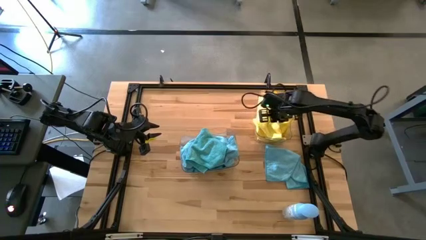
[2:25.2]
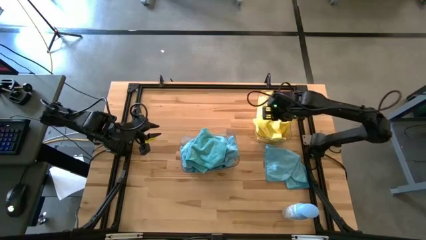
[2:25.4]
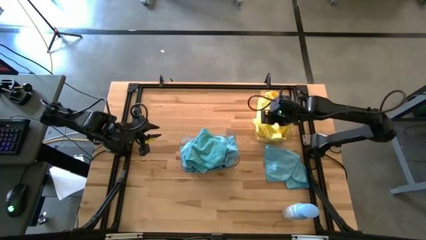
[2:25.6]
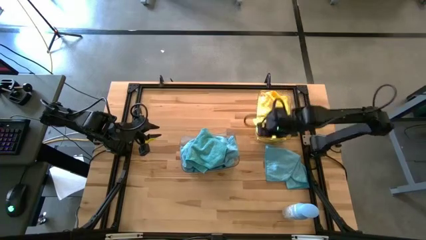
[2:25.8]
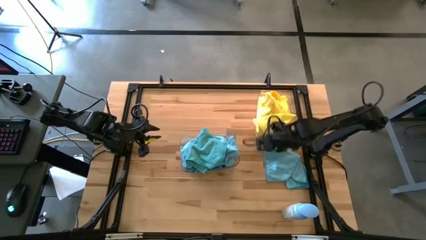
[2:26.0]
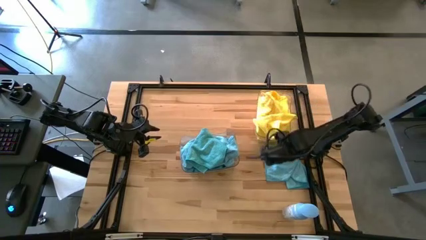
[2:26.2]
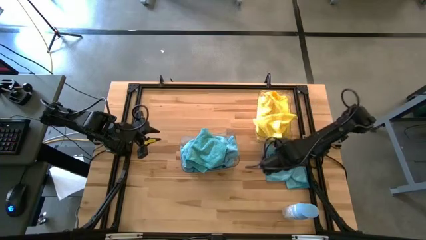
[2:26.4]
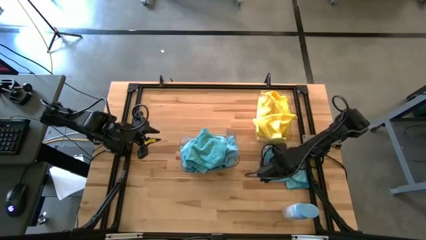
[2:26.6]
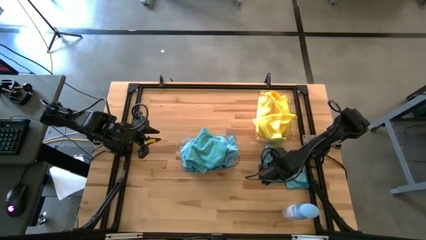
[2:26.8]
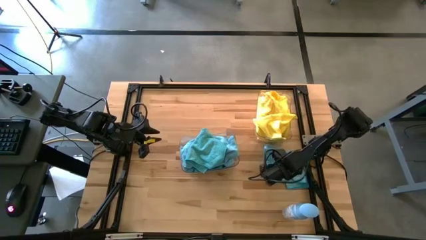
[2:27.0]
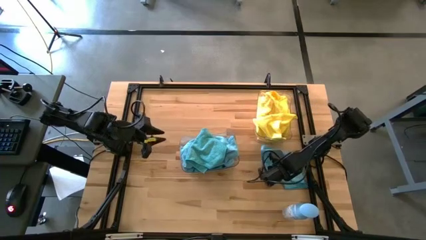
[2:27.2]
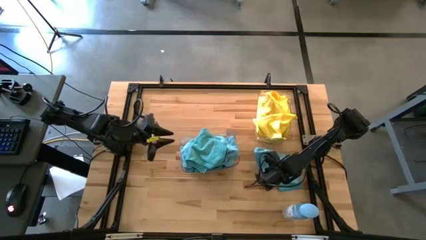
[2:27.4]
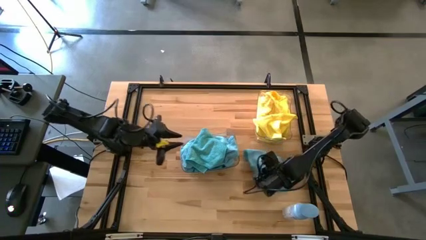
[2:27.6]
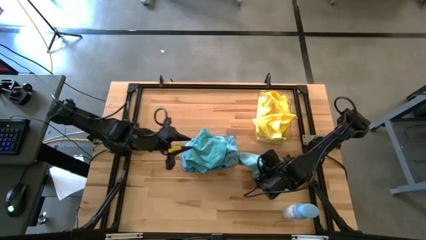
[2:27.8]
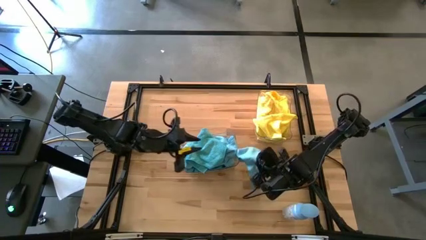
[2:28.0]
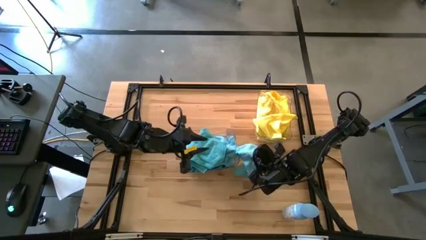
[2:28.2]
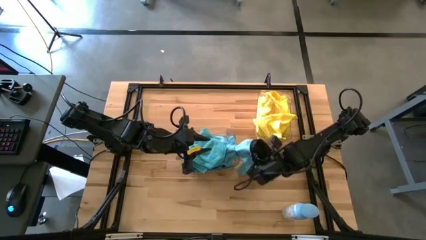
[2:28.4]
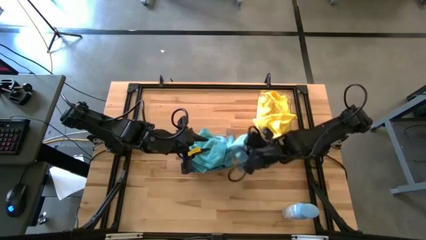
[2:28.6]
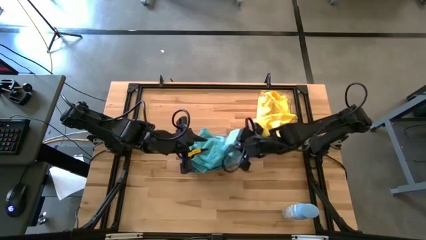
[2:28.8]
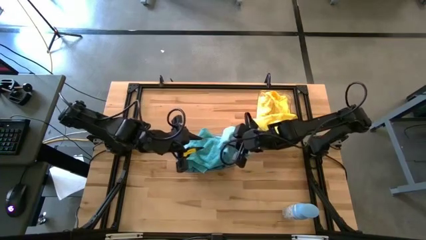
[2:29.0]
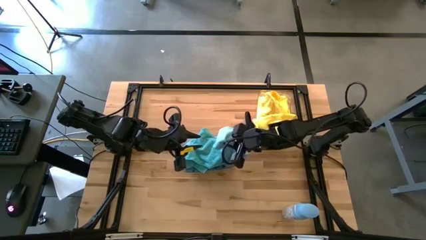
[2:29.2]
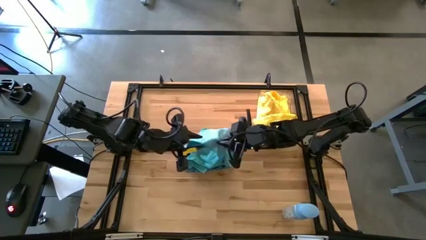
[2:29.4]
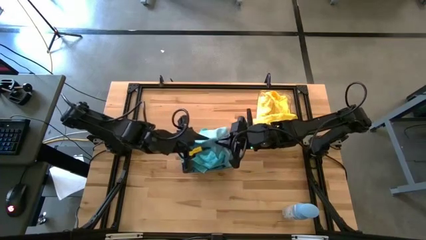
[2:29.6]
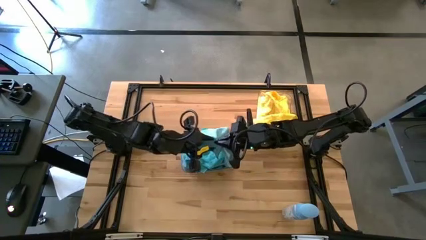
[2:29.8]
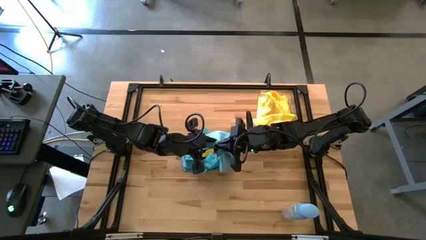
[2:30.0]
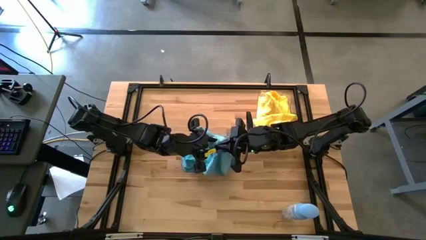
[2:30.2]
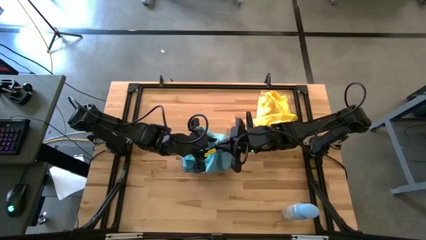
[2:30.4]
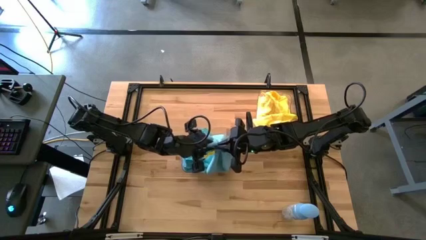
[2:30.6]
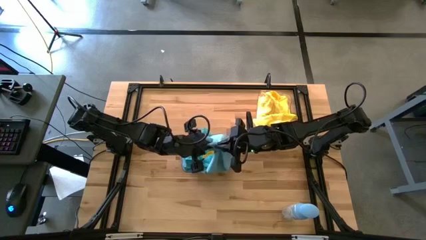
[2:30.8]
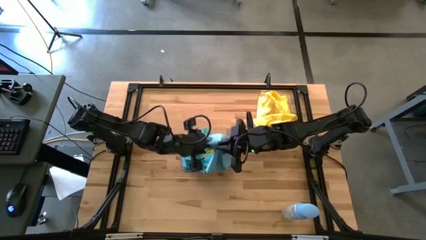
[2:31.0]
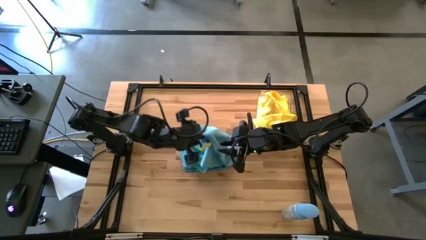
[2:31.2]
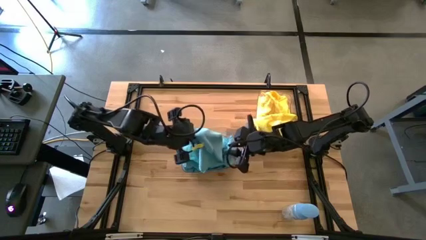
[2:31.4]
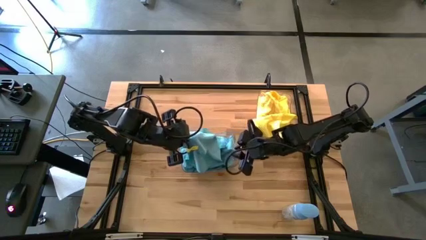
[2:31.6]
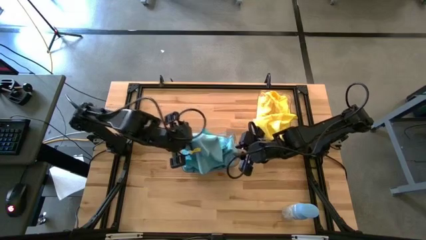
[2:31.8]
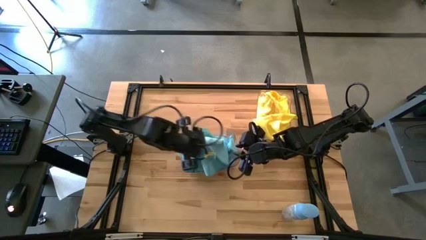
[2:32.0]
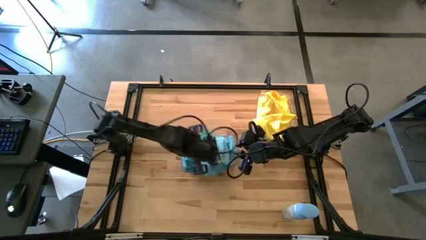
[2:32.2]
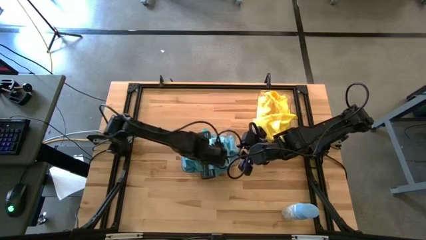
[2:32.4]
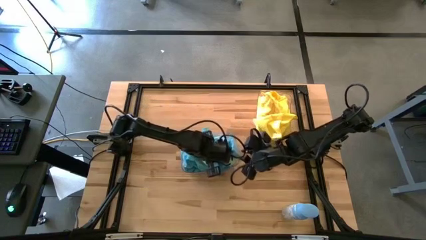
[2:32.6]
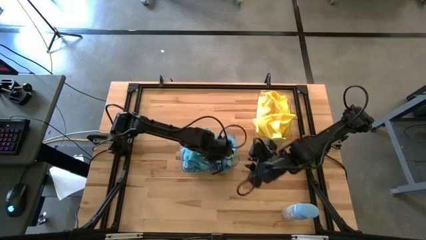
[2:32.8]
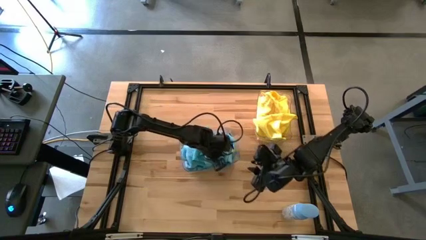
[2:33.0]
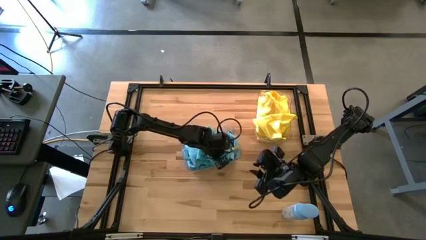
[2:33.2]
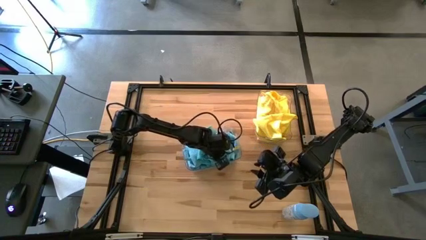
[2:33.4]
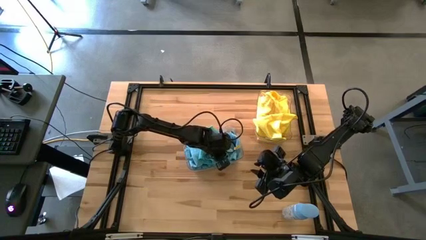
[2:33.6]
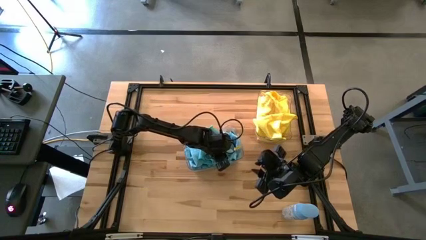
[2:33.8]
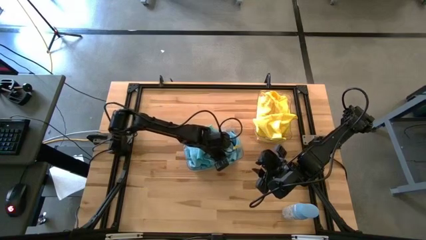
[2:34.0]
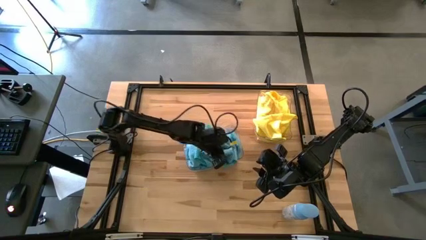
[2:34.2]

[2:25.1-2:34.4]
Task: Sort microfiber towel by color & place in baskets
Put the blue towel into the bottom transparent bin

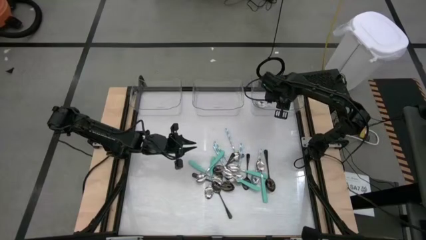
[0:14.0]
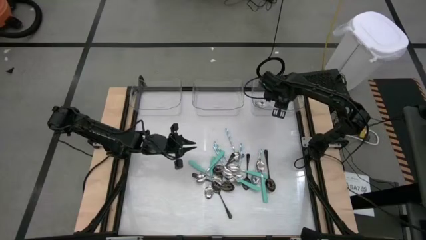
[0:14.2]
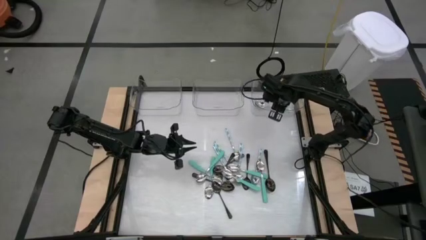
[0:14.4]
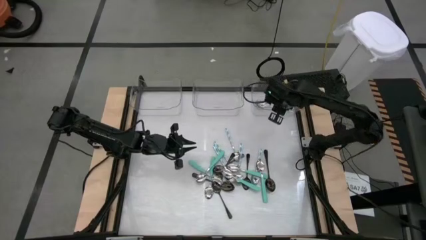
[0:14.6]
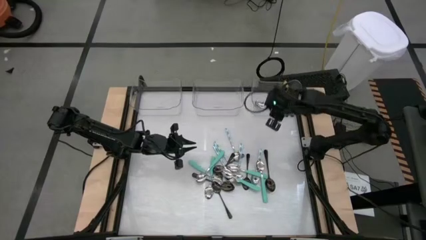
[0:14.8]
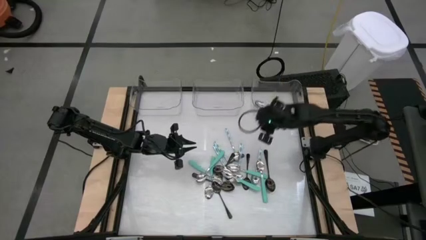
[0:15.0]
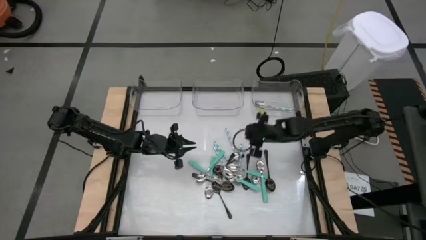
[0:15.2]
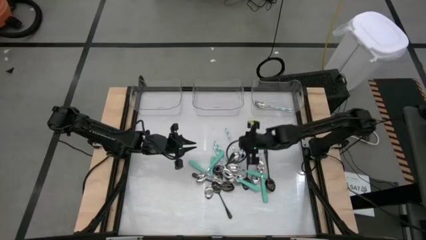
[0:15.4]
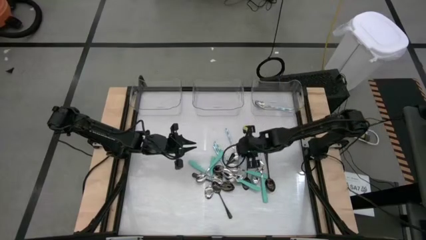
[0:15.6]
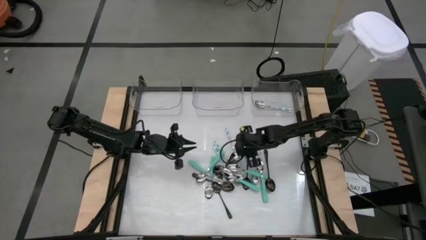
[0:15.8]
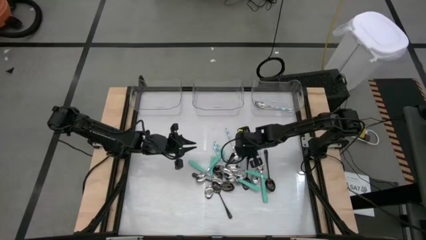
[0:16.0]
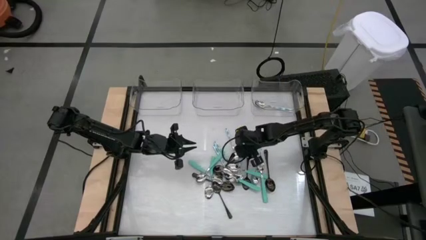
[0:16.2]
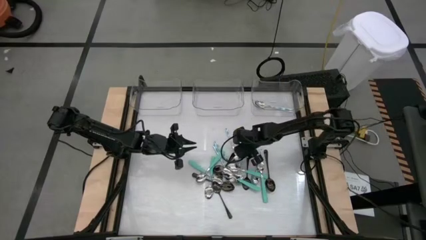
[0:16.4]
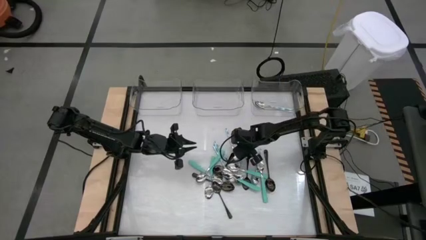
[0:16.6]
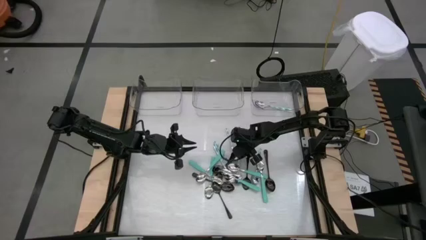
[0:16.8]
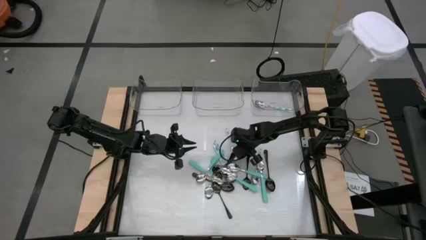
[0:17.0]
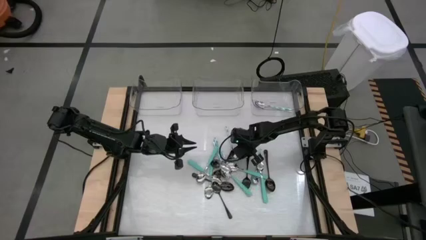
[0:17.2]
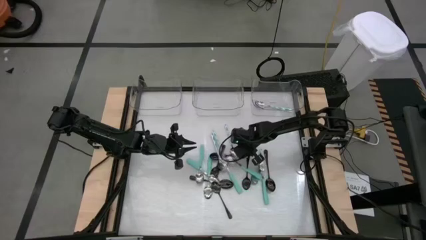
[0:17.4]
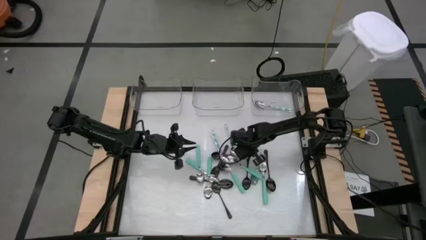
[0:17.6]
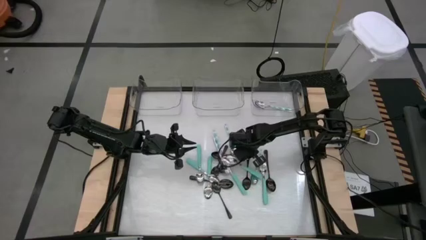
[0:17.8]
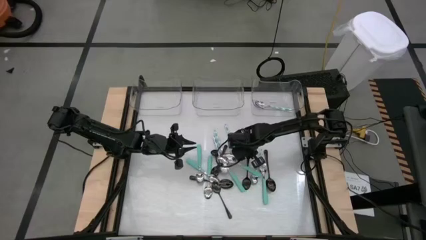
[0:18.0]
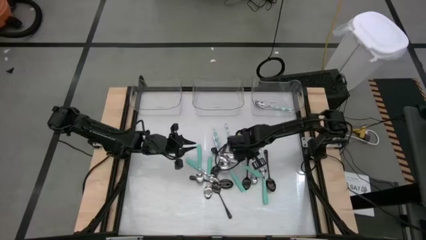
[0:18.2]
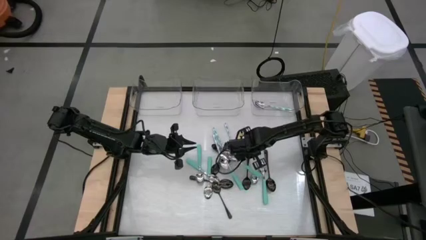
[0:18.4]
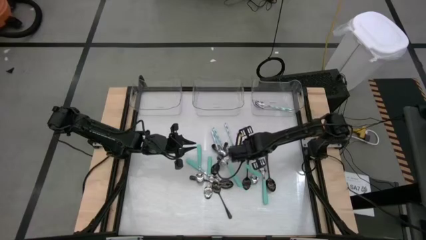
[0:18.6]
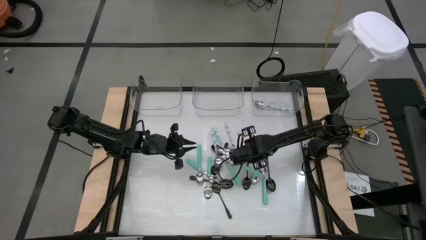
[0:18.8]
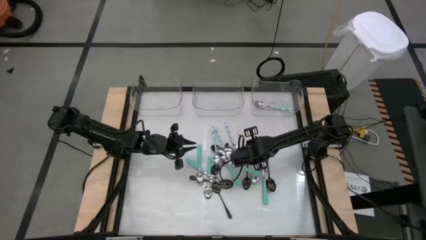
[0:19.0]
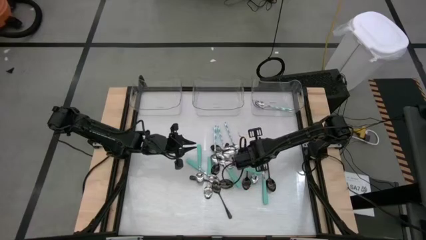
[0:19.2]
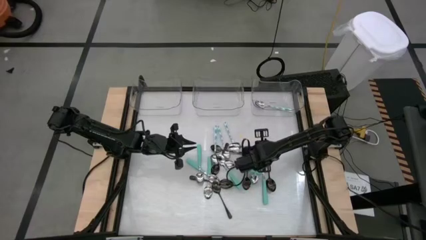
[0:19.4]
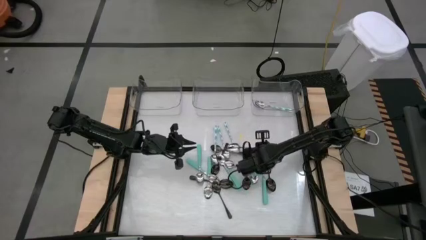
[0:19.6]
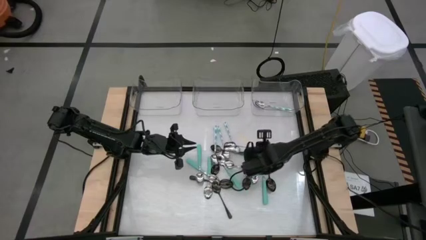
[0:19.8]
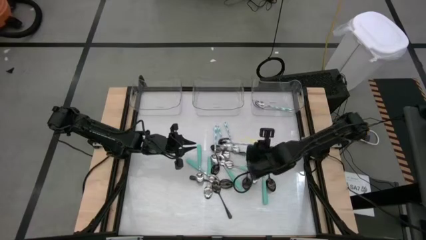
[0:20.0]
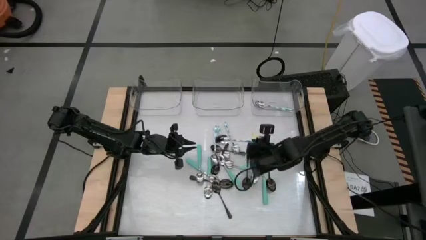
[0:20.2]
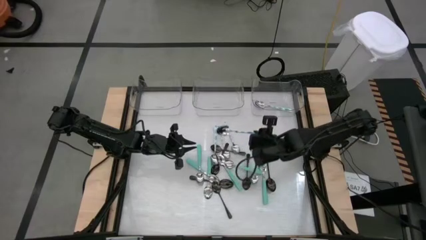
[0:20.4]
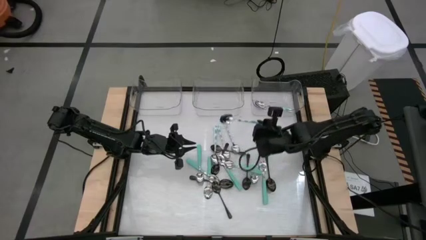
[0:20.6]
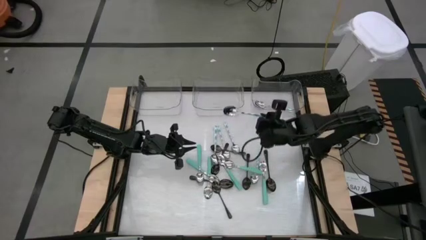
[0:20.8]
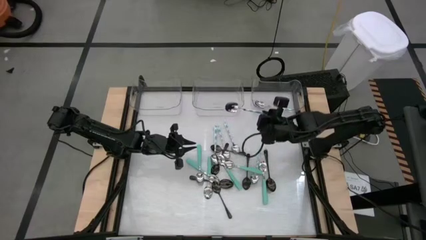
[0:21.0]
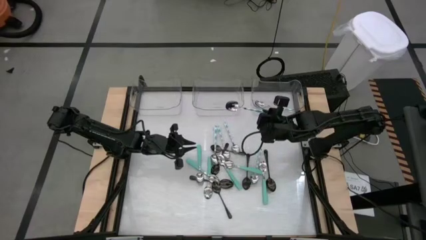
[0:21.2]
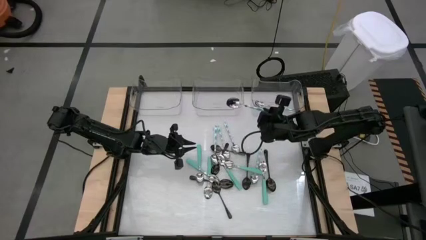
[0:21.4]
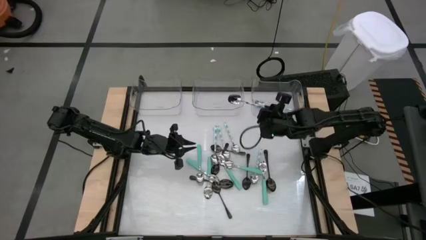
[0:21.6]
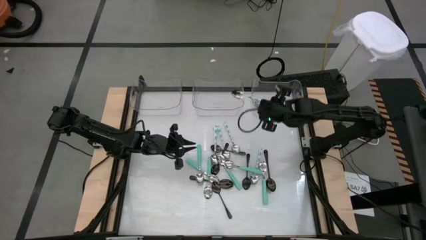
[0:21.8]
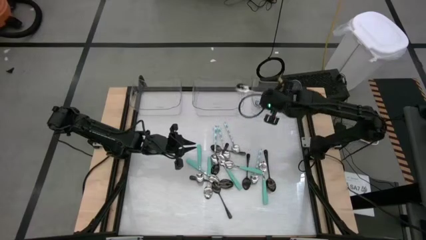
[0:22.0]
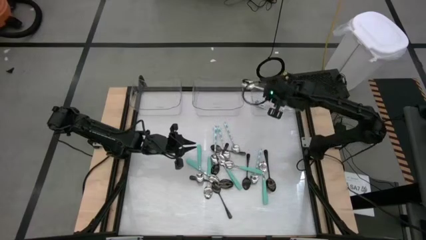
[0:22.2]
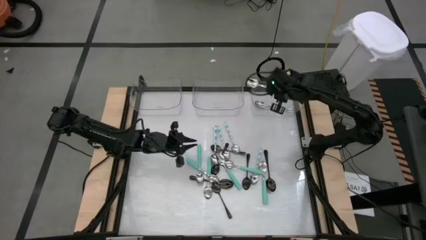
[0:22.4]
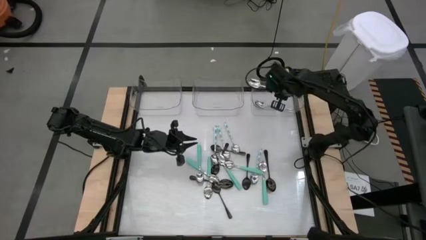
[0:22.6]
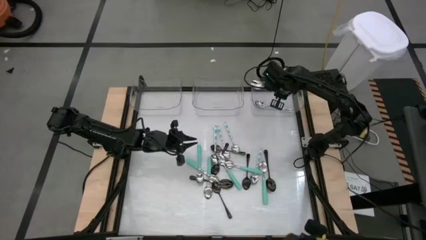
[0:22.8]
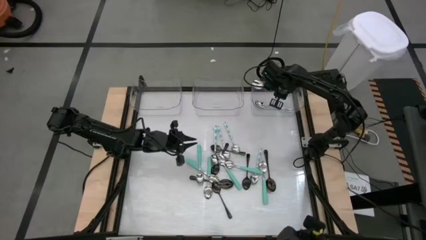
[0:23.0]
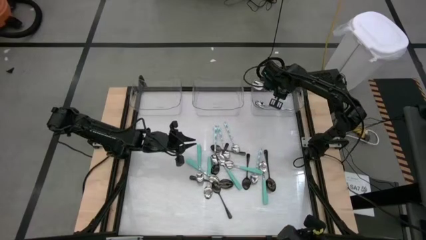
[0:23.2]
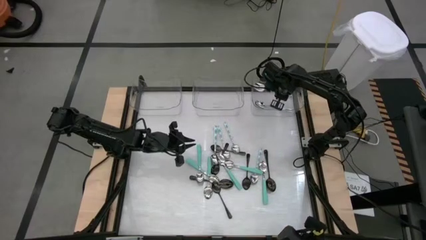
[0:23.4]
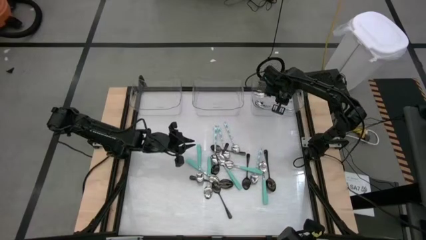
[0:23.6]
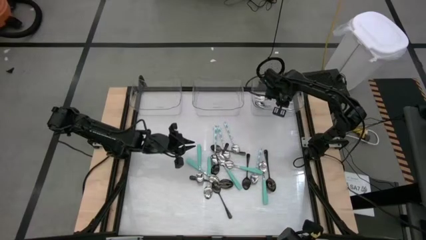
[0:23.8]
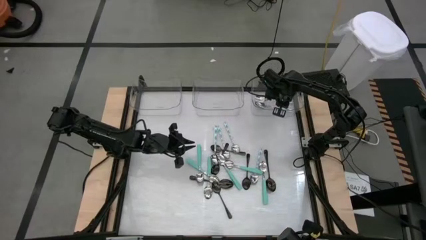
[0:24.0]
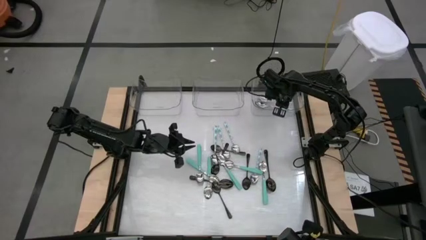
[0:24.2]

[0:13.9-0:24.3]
Task: Sort silverware by color (type)
Put the green patterned spoon into the right transparent bin
